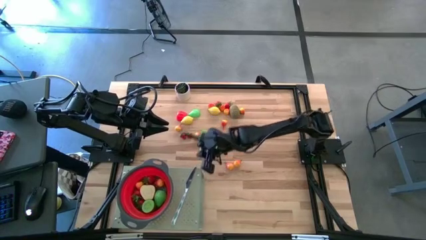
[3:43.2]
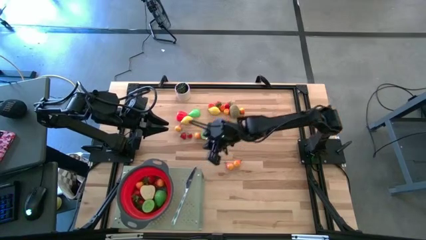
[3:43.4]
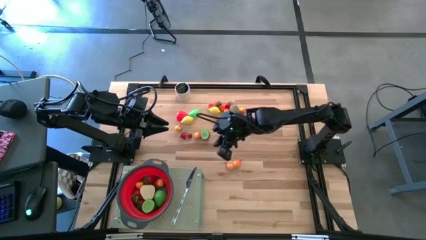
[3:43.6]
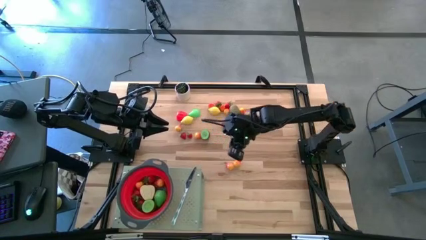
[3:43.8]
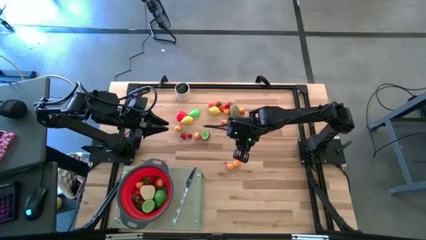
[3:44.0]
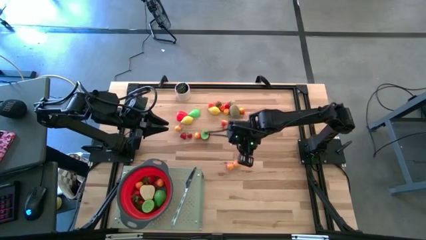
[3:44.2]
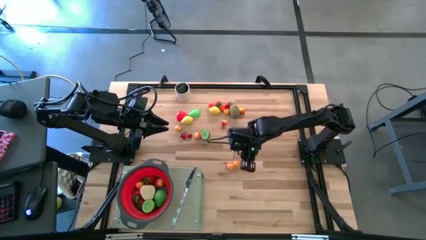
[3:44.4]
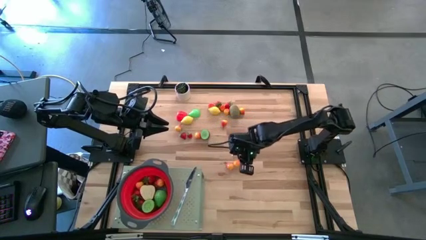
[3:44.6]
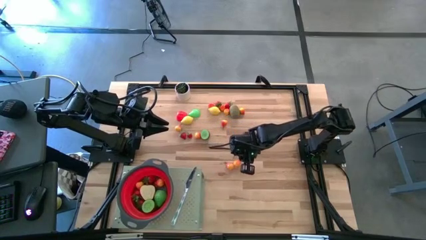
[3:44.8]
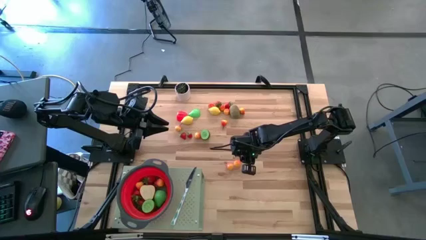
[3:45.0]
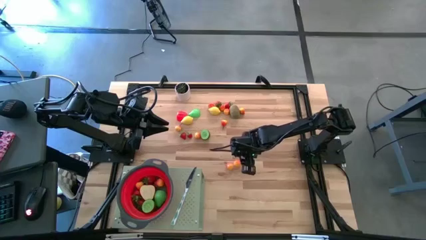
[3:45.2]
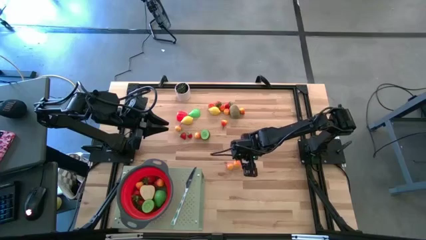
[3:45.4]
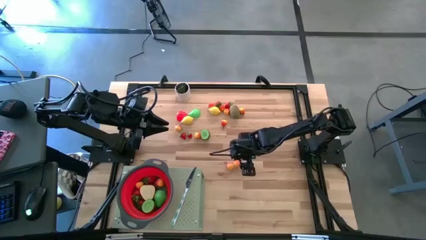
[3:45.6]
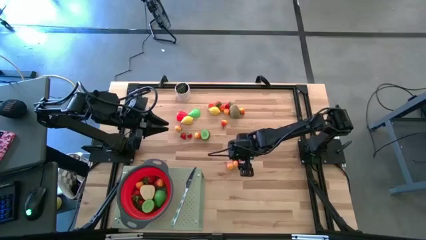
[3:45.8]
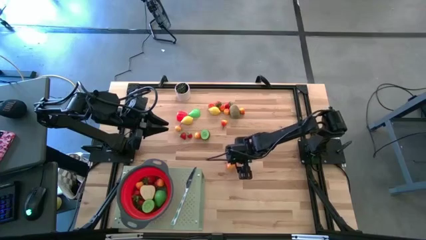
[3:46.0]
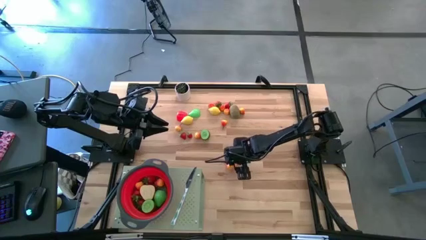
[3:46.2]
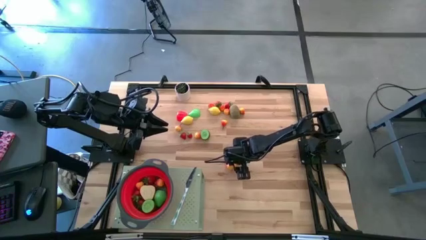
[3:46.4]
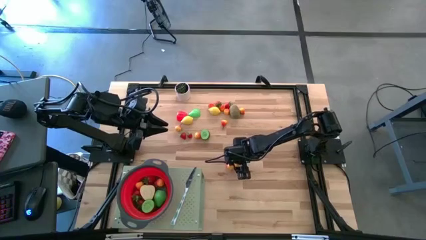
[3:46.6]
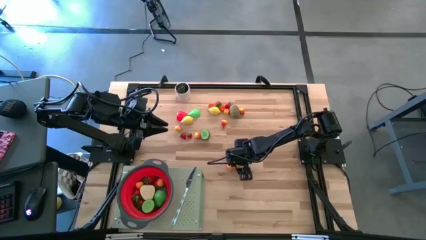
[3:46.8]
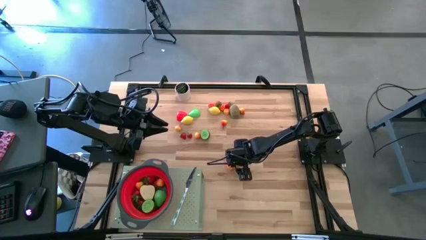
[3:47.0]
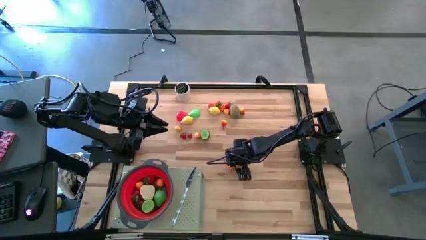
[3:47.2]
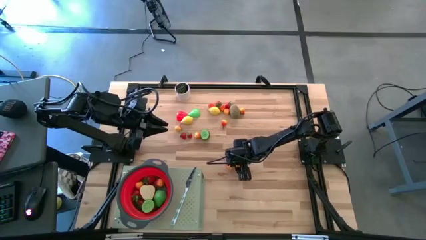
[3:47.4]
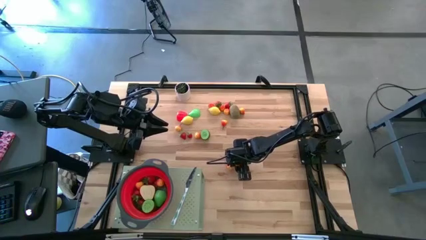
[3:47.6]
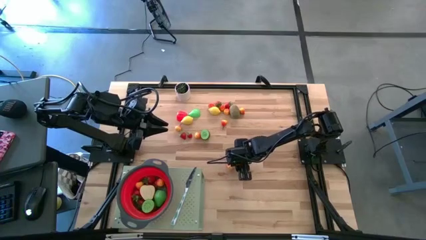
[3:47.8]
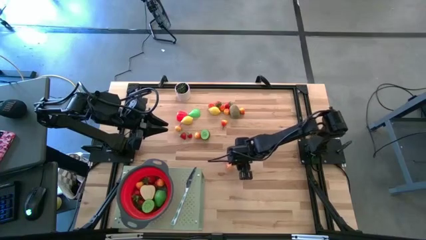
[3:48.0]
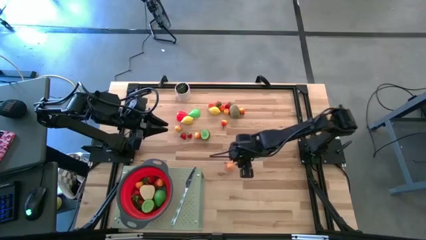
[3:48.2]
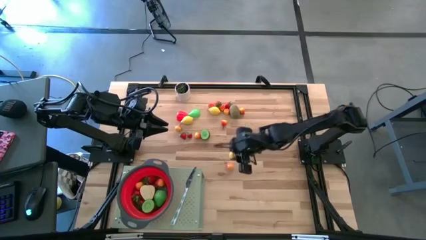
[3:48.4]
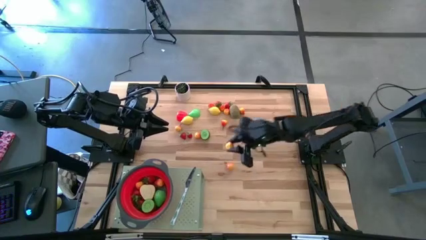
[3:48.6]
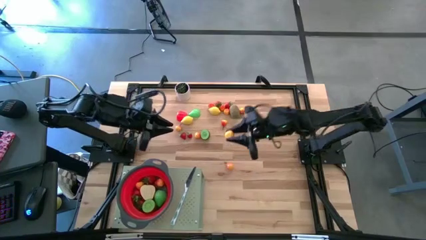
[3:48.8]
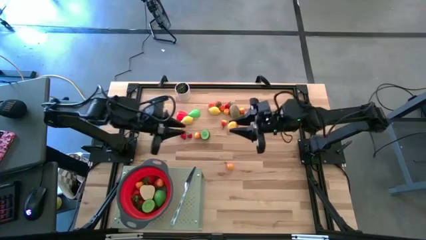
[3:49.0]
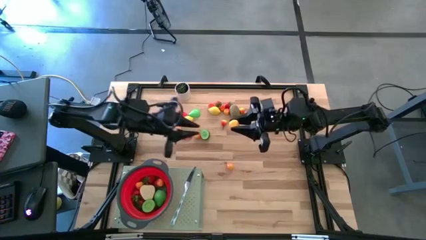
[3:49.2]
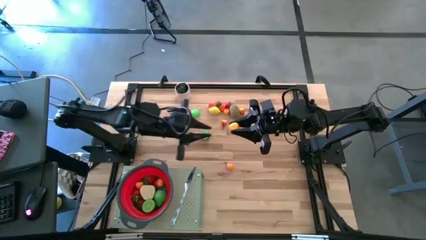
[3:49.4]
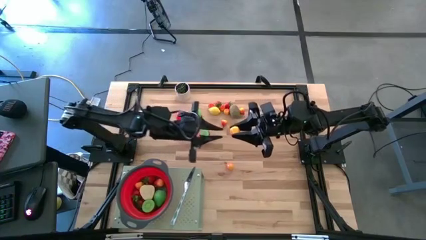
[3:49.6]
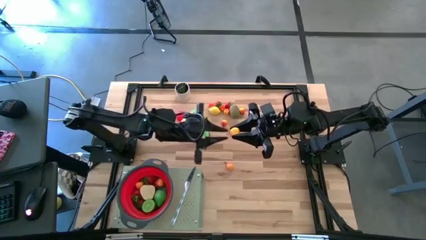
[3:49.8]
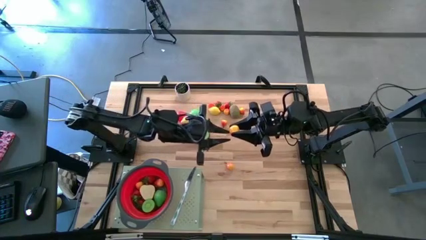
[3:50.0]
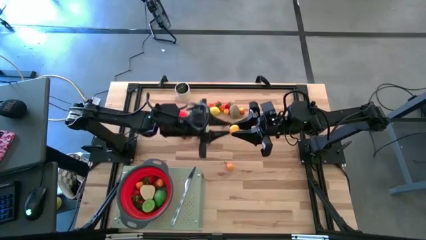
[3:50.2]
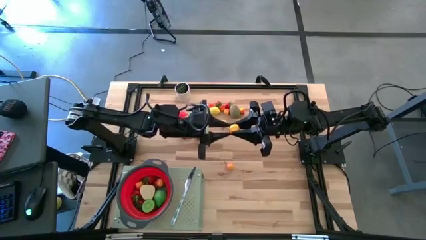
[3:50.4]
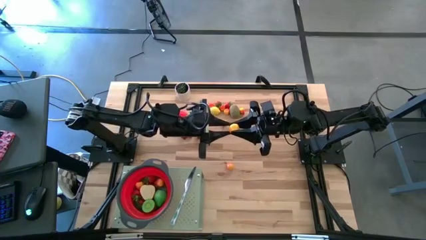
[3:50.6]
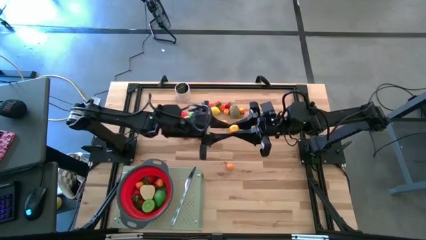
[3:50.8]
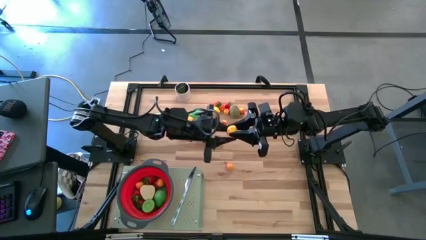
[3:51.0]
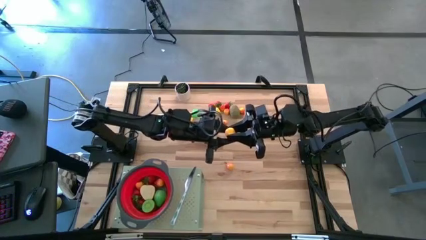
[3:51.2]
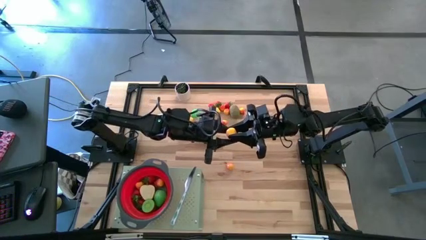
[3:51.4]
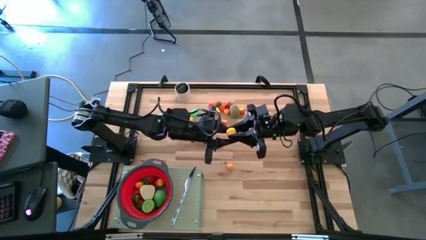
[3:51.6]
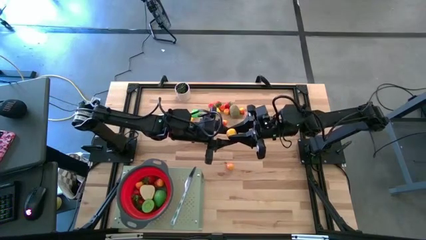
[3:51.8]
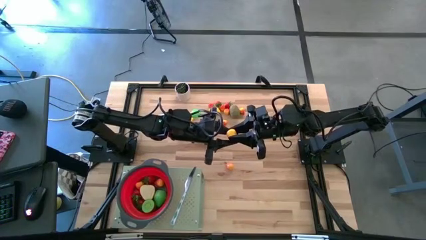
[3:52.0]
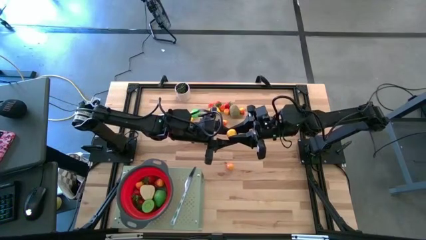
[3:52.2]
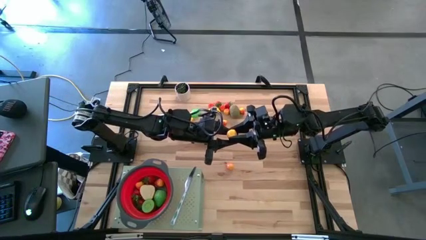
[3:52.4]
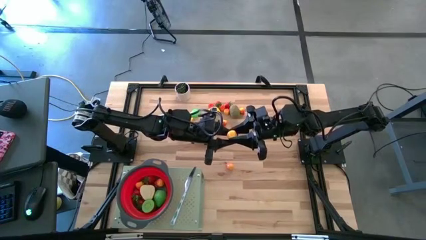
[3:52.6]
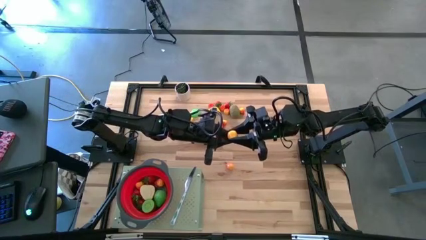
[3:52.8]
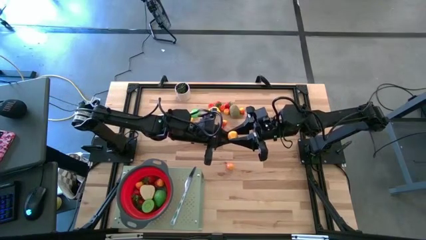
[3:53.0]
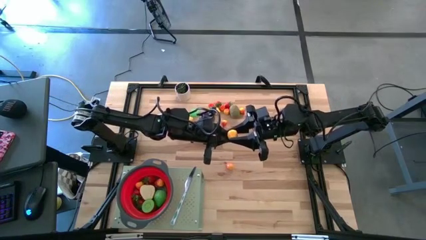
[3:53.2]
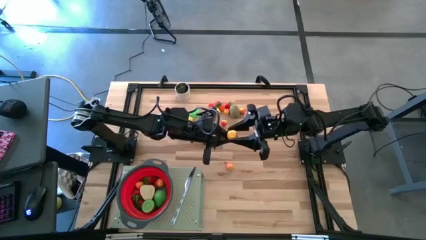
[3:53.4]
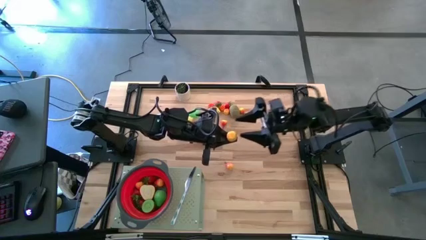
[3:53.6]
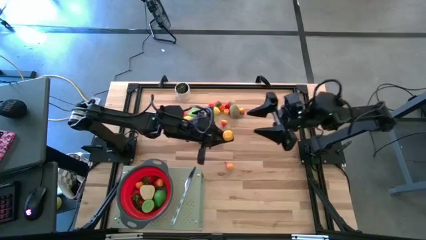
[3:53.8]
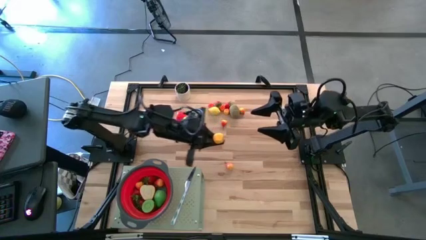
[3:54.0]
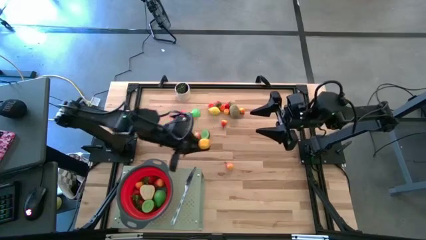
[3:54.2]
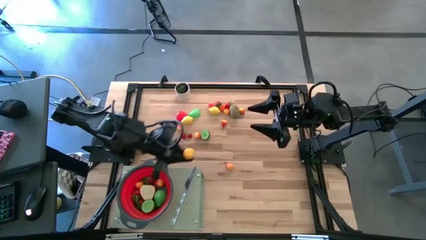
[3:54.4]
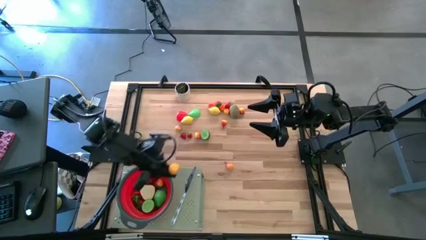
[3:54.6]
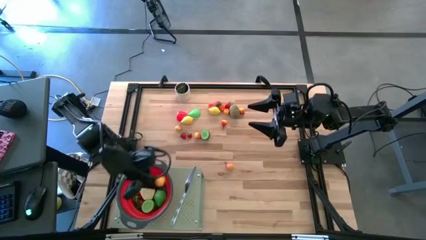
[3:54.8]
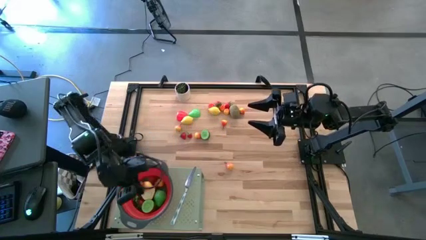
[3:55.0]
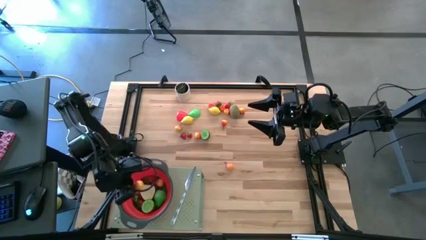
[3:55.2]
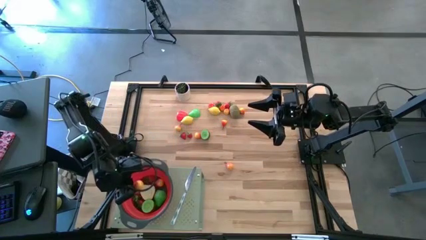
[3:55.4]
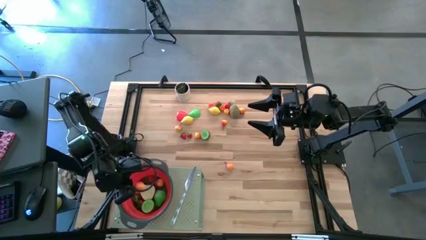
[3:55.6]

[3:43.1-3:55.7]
Task: Pick & Place Fruit
Put the pear into the red strainer bowl on the shelf

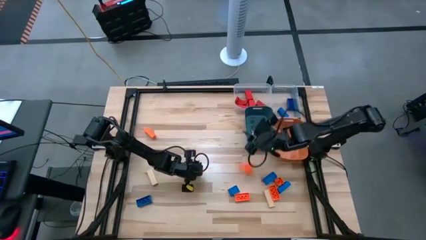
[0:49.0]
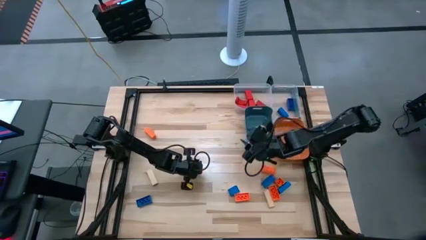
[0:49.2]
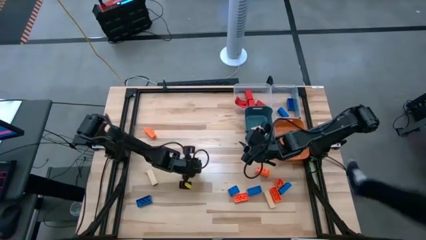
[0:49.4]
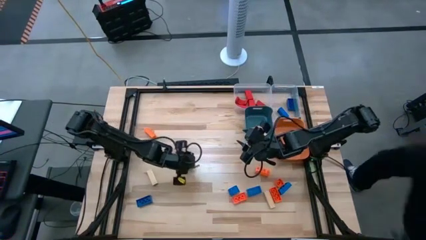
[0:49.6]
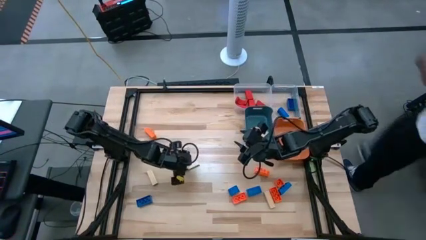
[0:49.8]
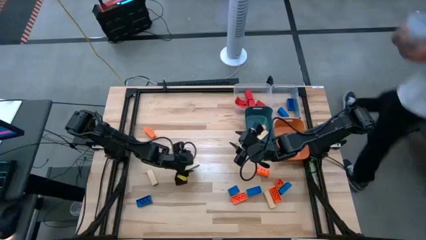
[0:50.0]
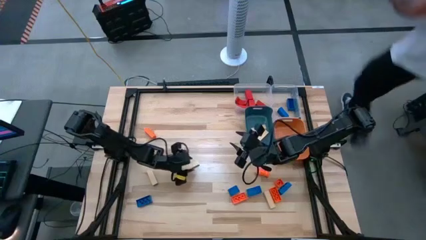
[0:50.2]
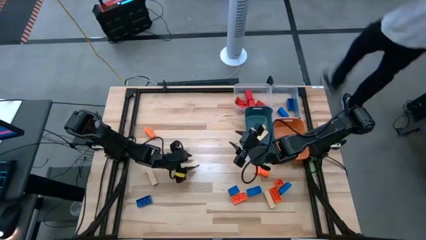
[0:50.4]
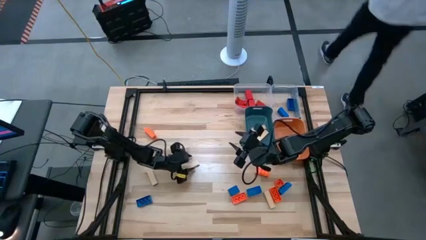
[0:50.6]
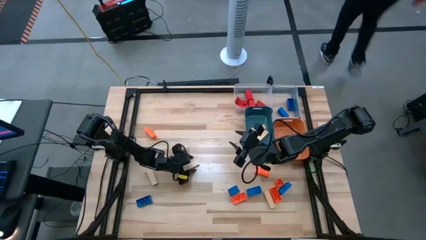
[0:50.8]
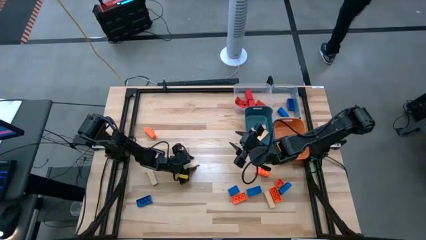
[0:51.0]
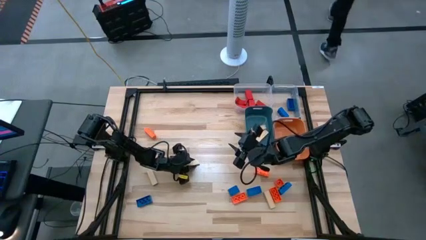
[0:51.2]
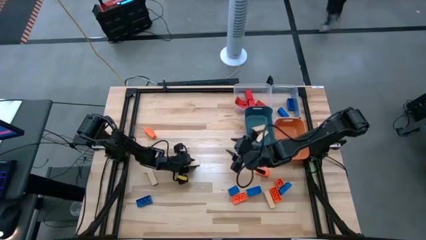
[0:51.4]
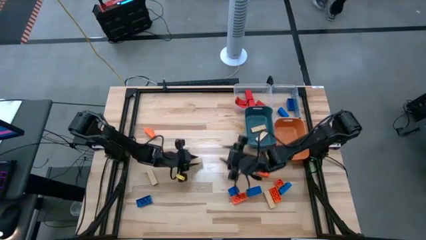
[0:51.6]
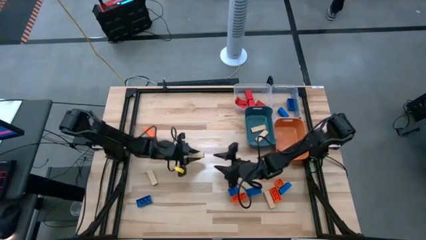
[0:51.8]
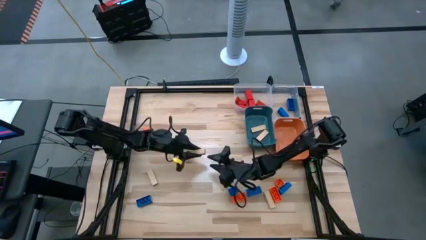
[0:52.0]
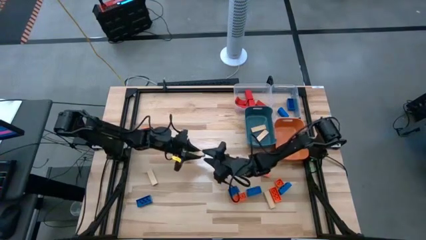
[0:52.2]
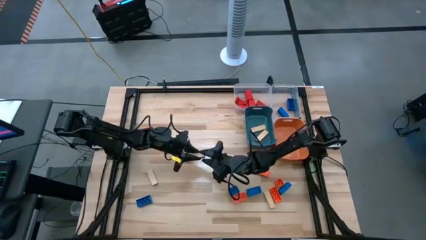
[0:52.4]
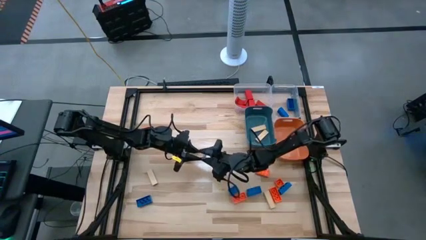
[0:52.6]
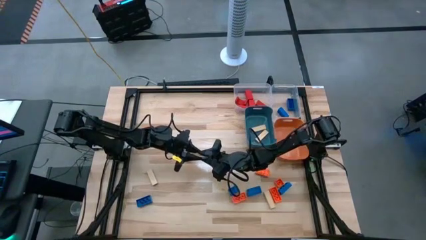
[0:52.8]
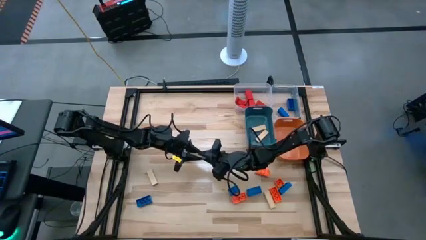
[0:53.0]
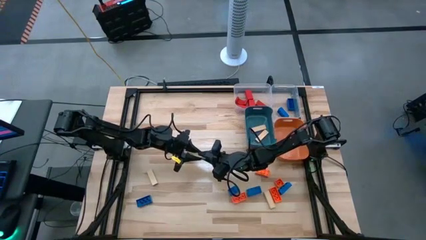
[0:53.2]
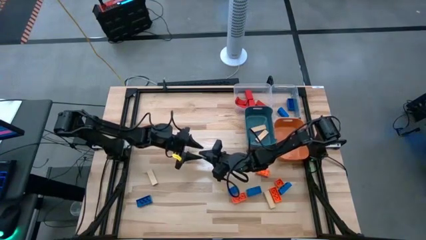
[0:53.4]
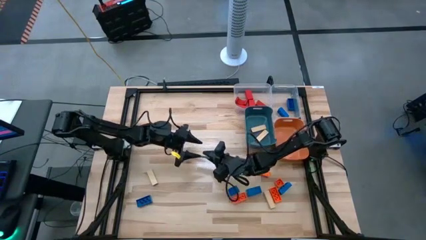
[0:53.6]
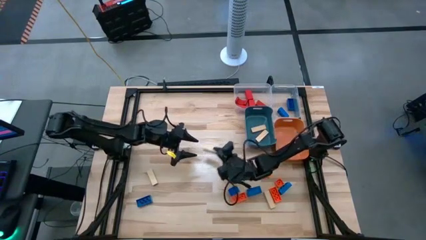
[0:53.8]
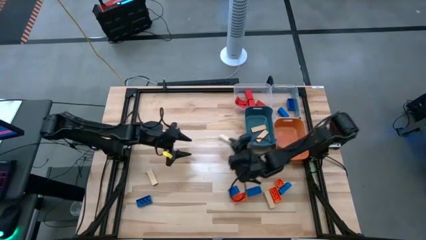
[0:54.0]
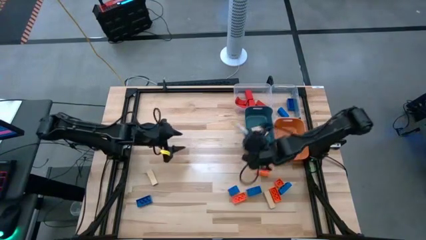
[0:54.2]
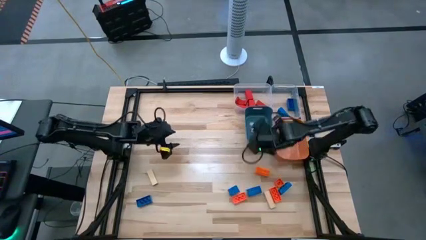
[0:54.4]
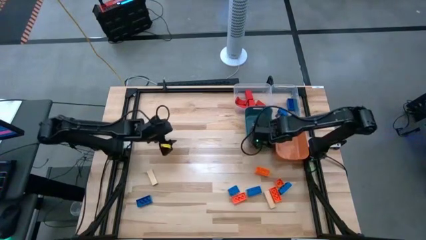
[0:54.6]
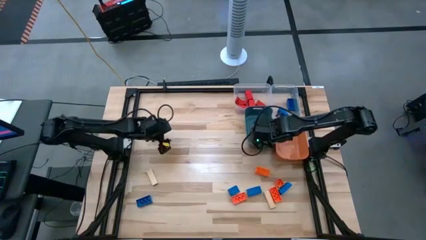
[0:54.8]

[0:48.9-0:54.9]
Task: Sort blocks
Put the brown block into the blue bin
